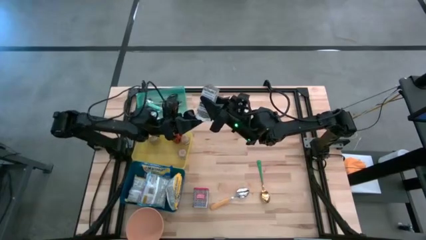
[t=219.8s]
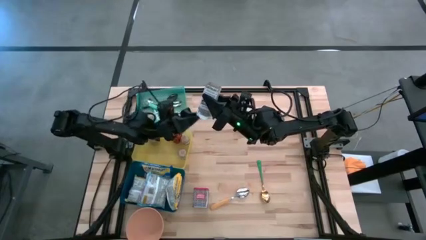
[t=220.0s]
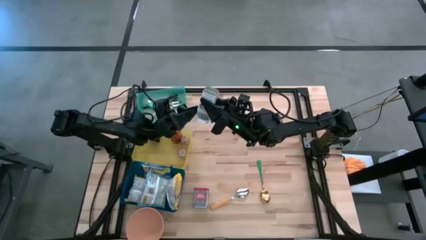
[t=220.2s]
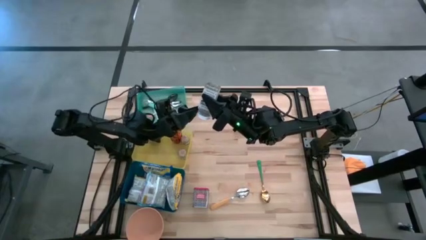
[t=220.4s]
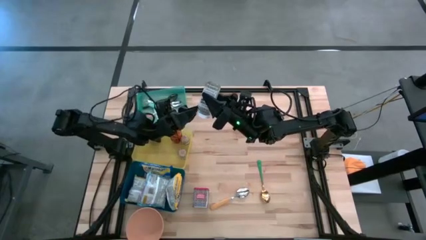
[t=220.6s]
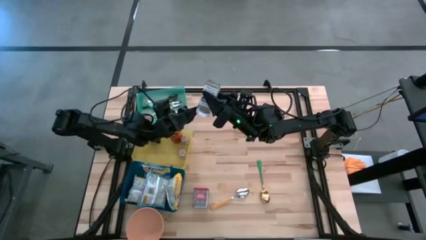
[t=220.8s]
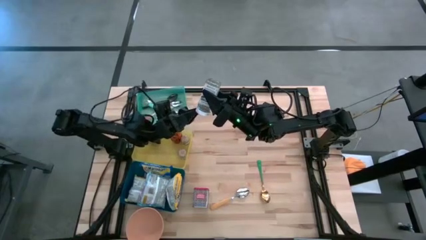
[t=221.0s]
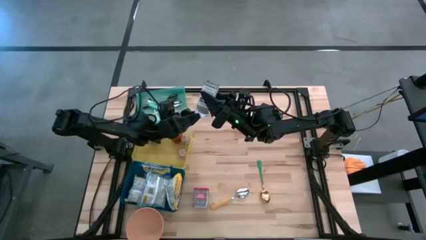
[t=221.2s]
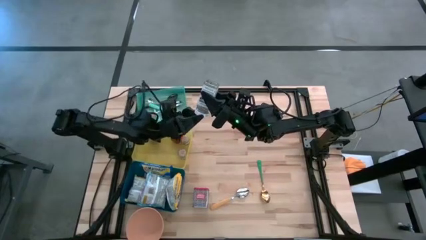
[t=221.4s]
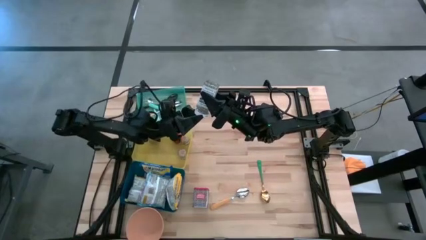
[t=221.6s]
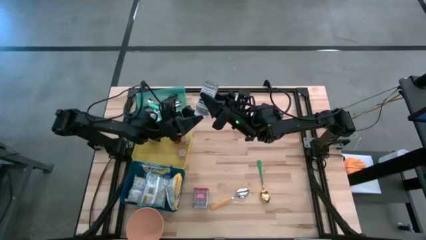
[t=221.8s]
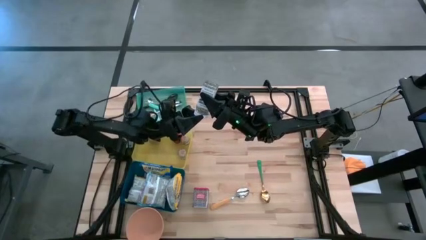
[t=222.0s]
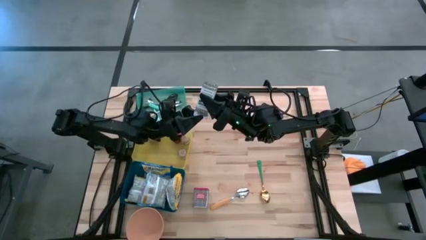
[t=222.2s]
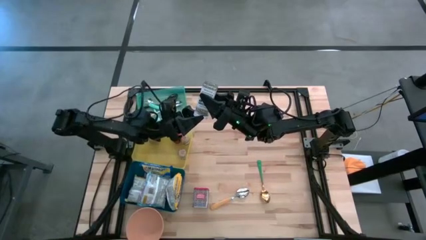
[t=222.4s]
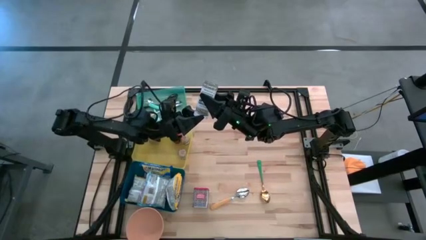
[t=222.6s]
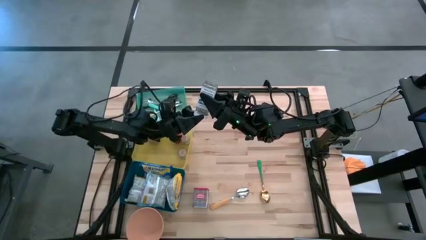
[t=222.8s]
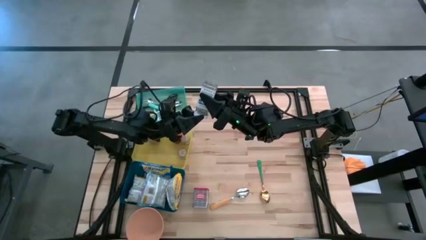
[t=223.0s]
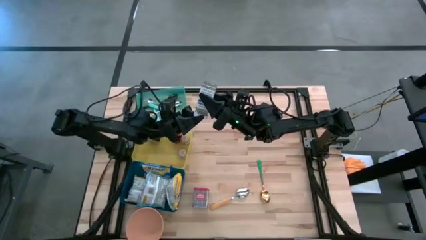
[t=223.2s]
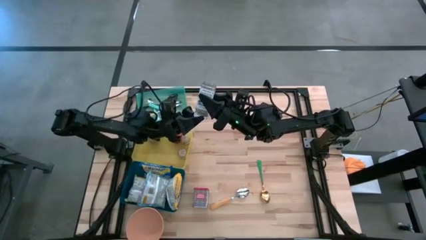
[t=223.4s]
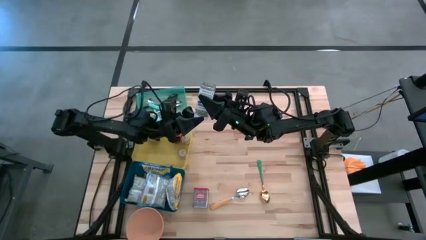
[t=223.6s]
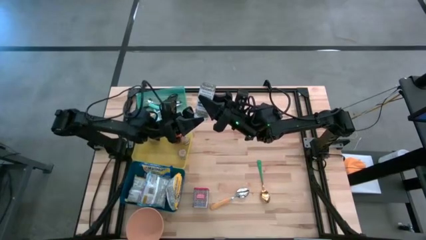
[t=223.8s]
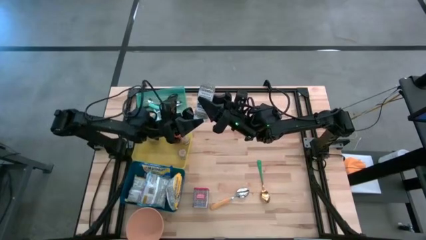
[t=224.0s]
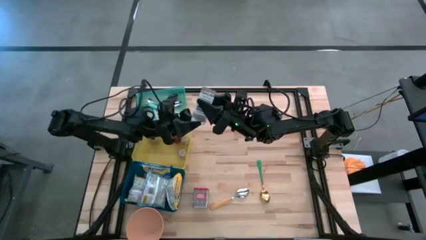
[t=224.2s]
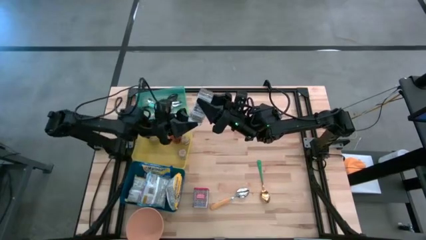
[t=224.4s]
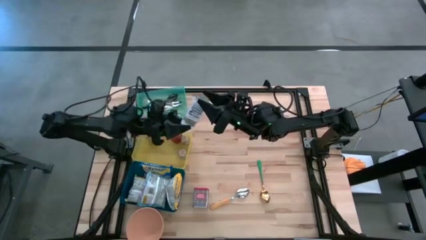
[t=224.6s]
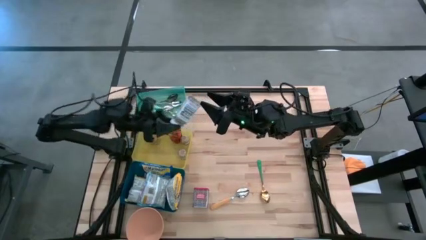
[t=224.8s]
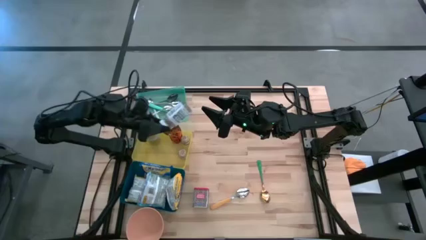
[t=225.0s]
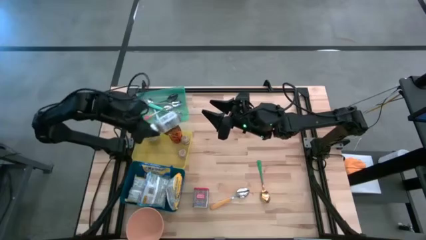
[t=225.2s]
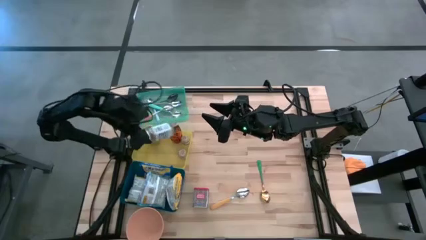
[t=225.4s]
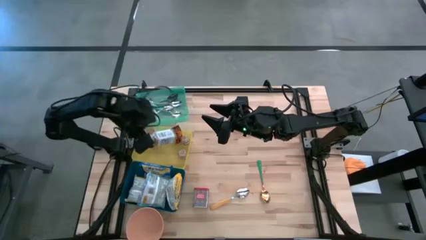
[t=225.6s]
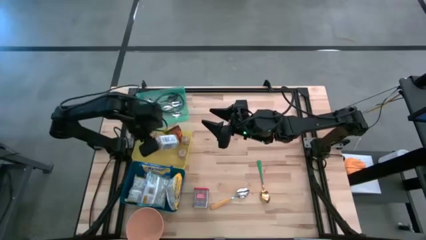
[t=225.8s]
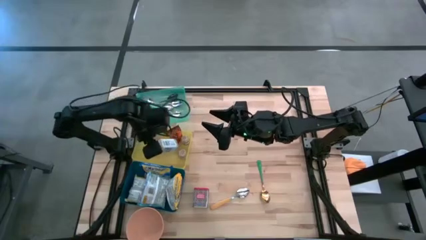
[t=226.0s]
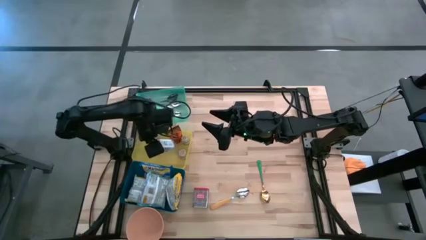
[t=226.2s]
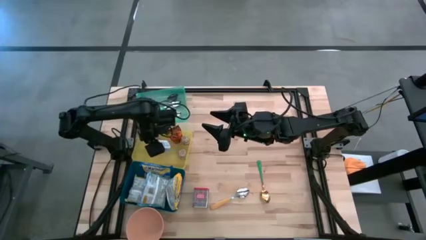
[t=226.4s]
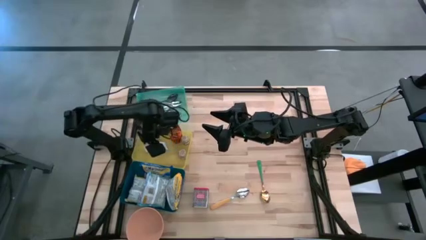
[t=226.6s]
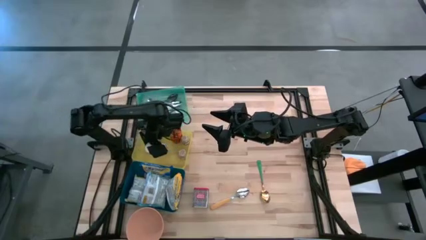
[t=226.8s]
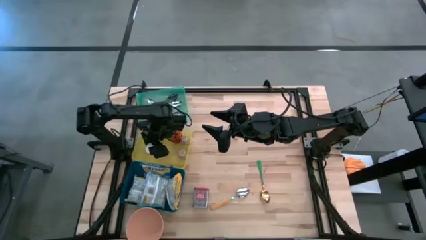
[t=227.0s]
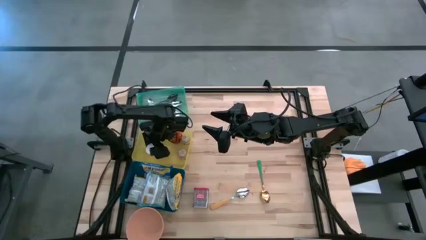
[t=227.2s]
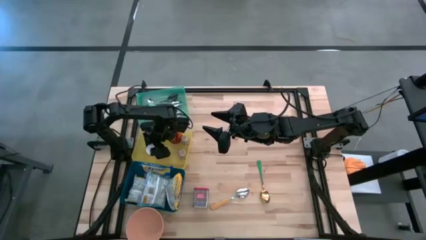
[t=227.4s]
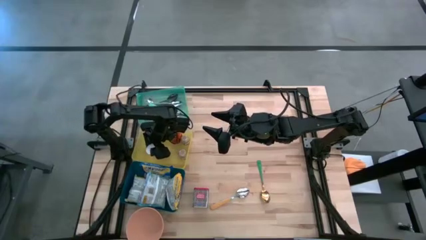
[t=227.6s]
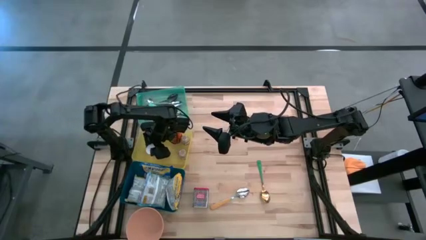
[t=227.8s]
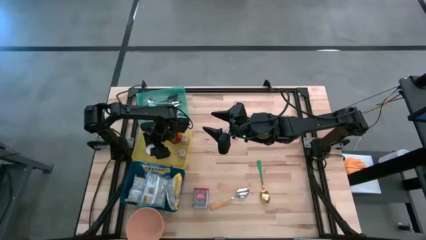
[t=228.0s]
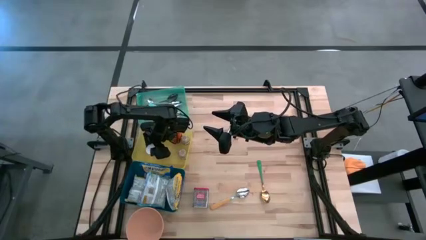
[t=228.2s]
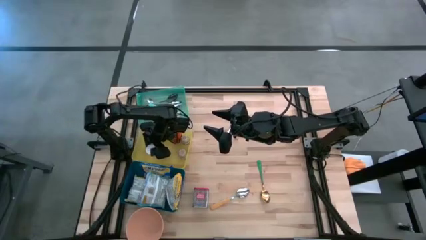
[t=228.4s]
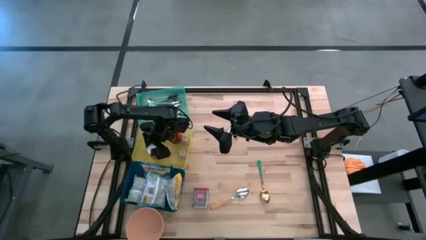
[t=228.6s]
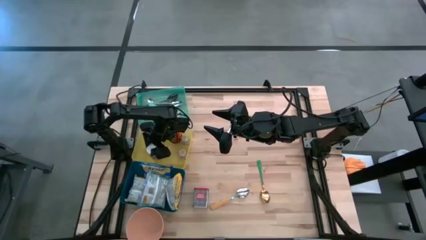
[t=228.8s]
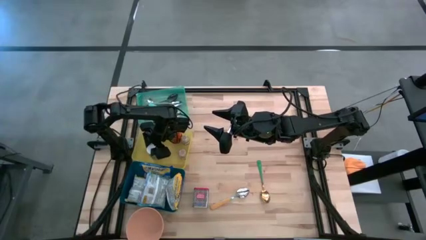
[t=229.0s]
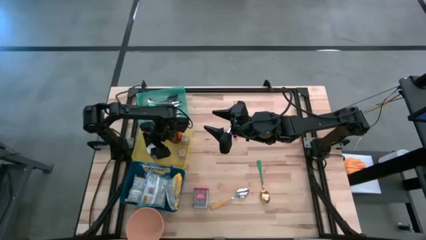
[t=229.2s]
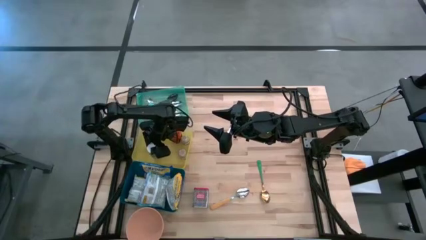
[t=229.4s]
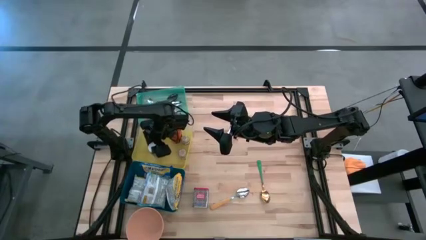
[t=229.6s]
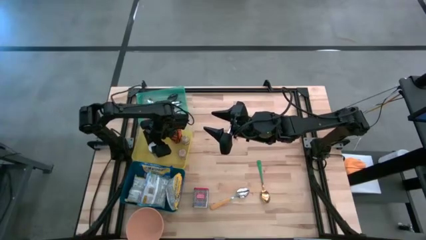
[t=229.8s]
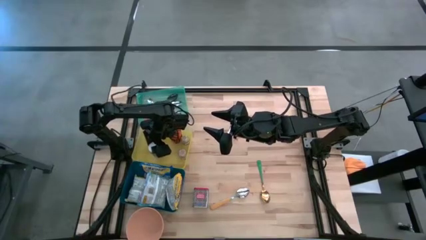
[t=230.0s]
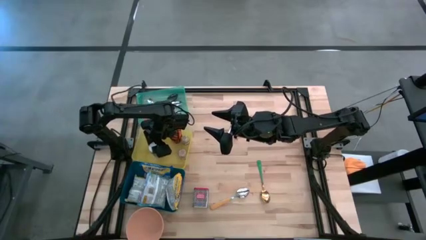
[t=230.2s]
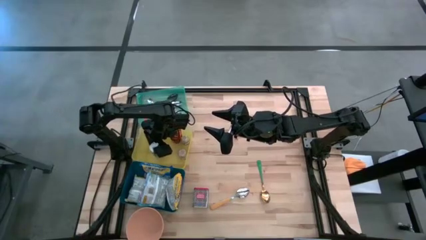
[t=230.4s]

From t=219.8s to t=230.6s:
Put the white seasoning bottle into the yellow bin
